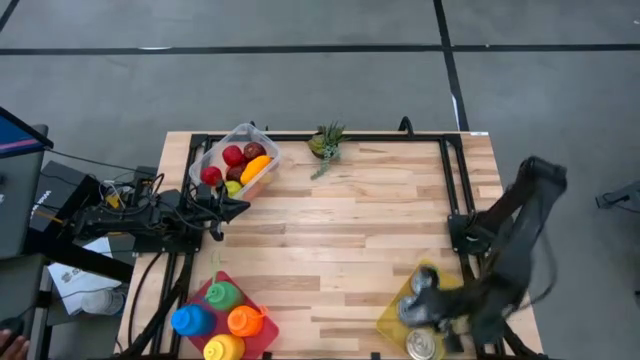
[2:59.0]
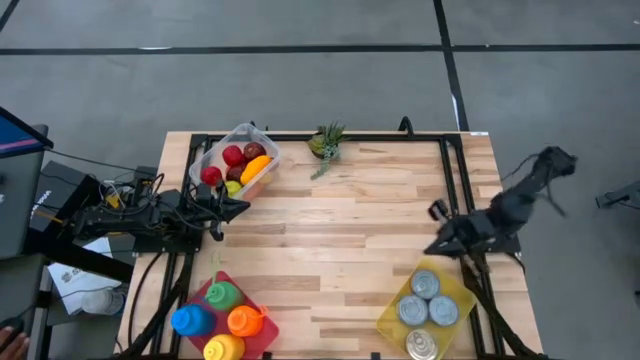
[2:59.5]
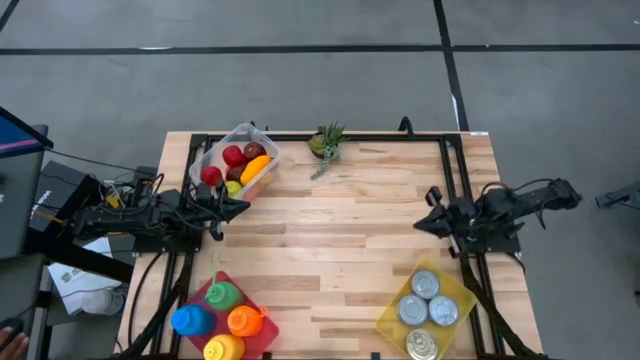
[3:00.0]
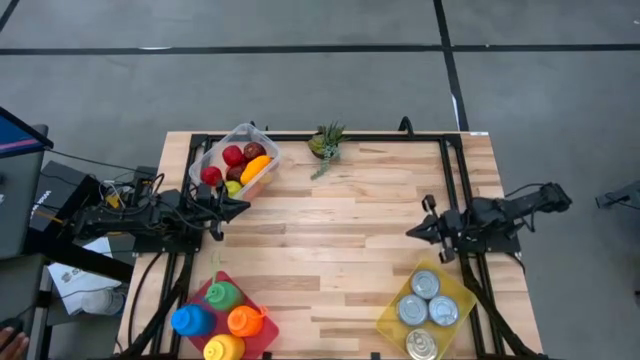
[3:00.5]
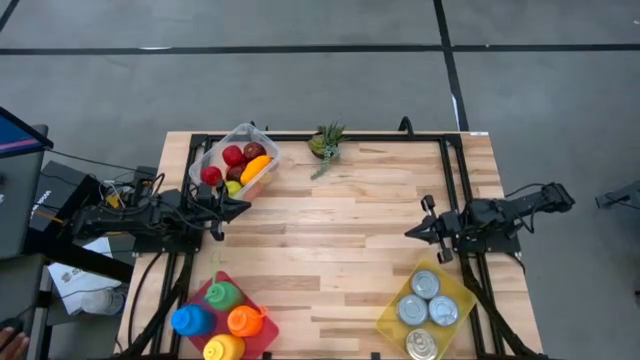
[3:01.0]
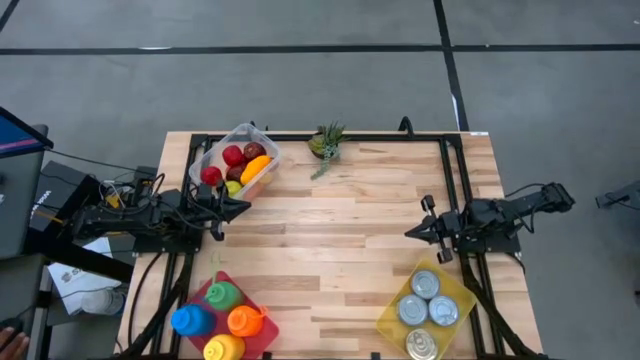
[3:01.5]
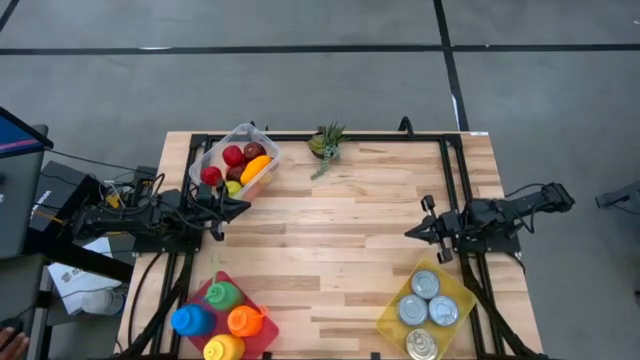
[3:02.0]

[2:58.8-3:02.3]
Task: Pick & Place Food Item
Return to Home Position

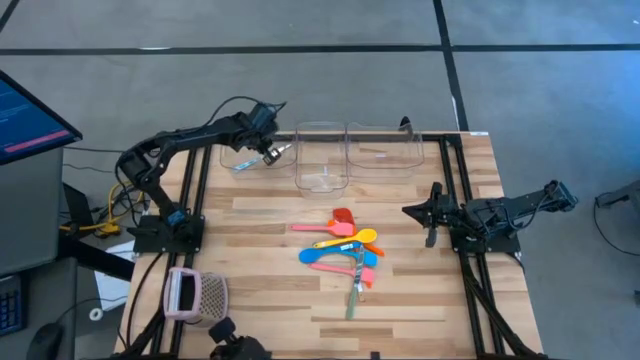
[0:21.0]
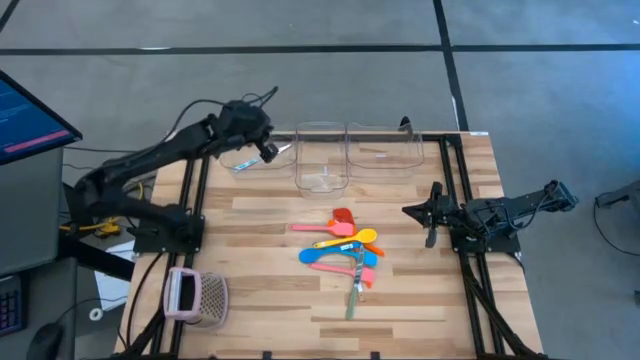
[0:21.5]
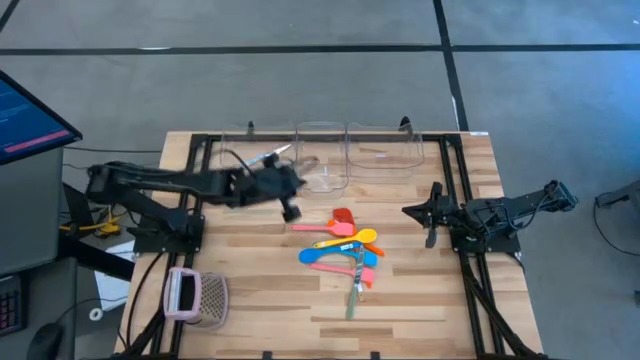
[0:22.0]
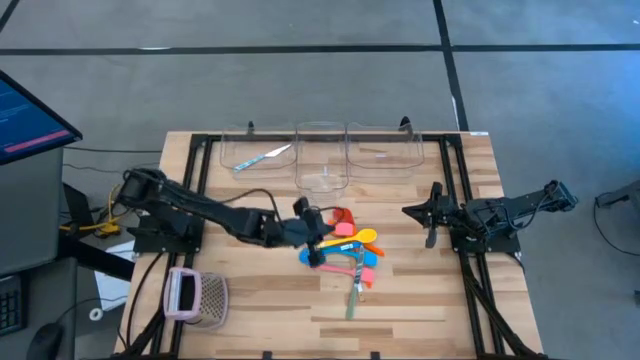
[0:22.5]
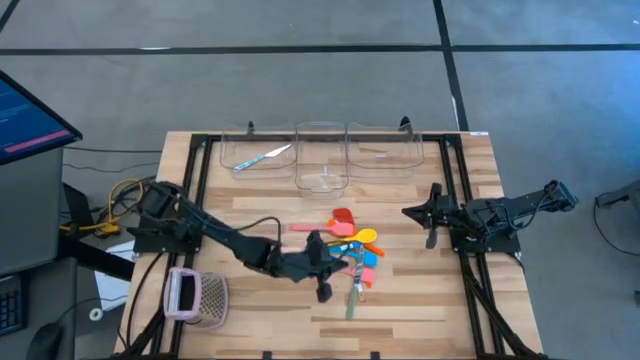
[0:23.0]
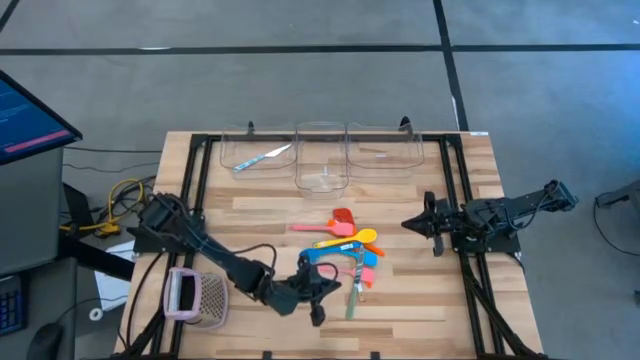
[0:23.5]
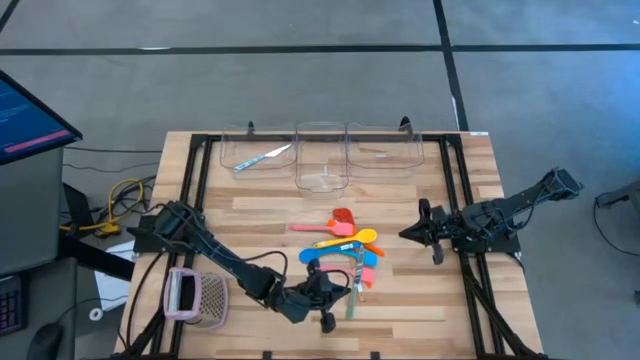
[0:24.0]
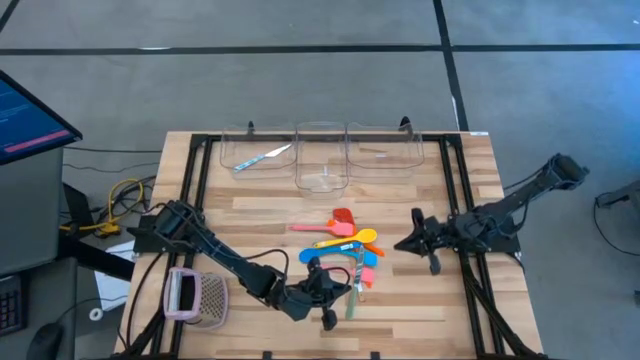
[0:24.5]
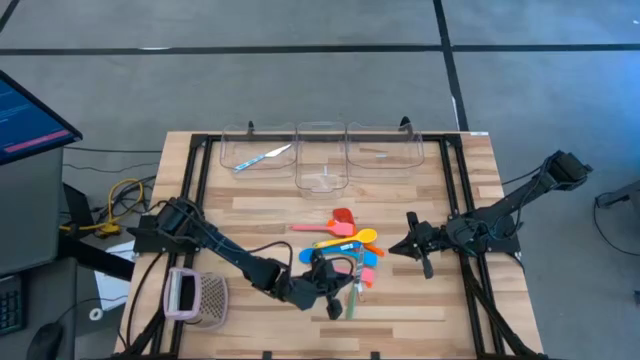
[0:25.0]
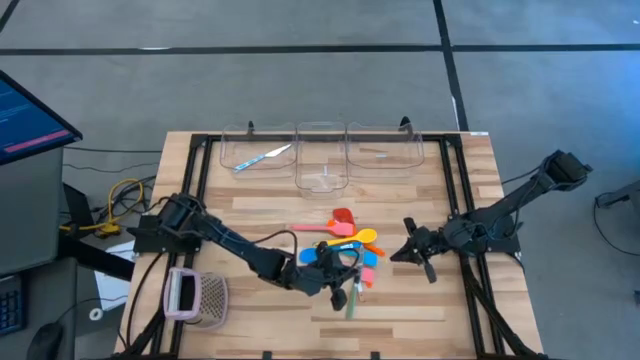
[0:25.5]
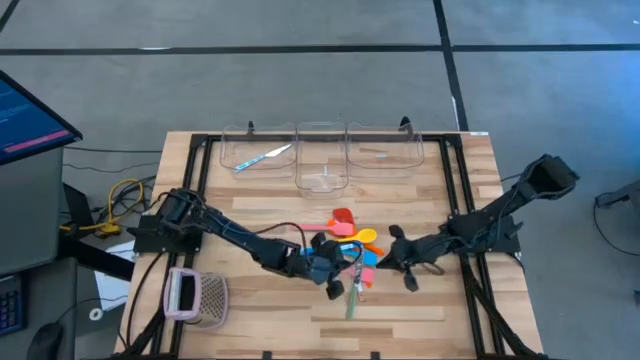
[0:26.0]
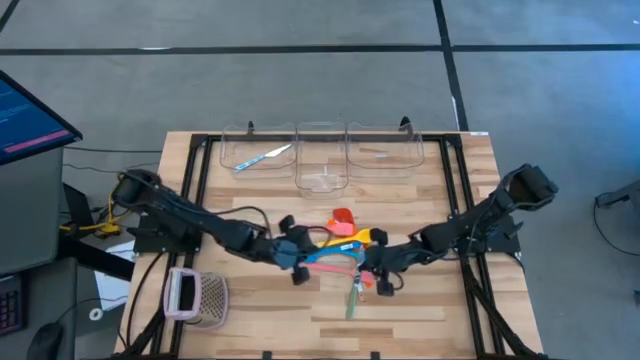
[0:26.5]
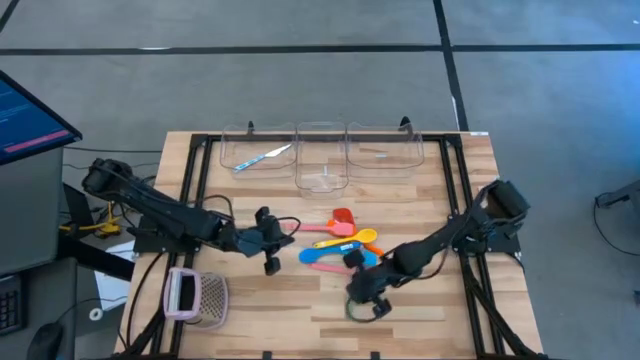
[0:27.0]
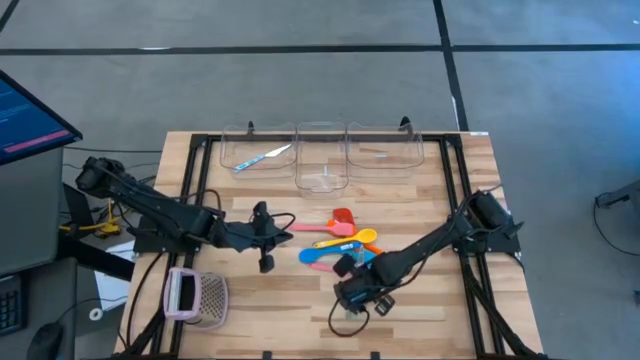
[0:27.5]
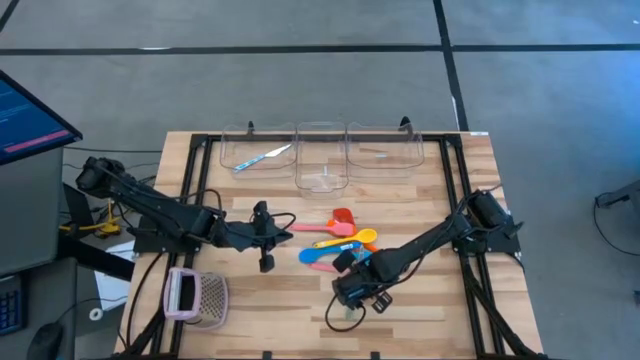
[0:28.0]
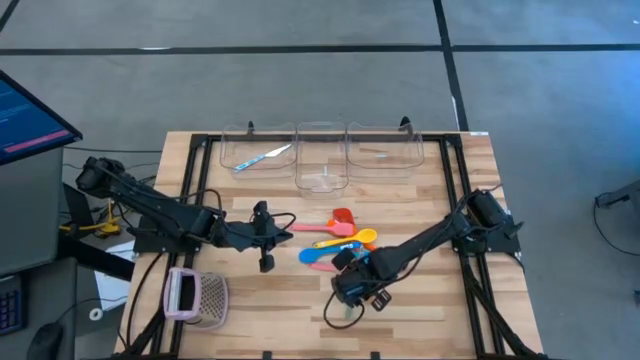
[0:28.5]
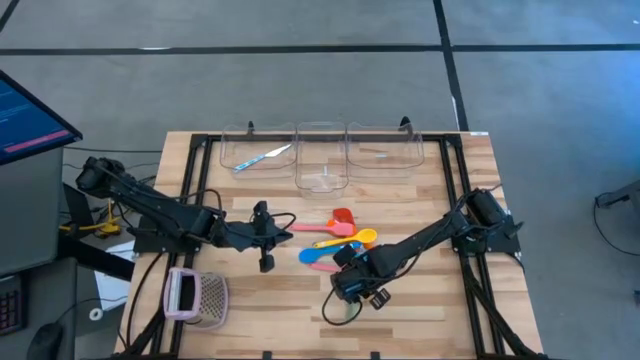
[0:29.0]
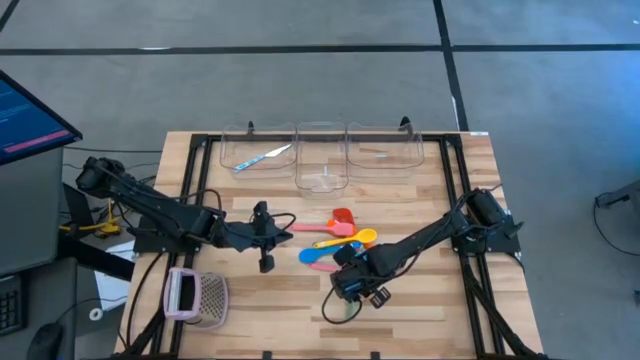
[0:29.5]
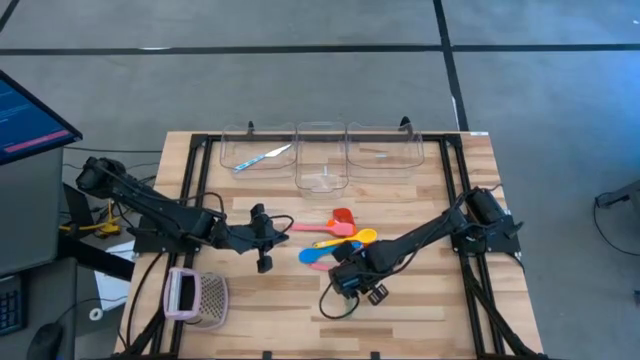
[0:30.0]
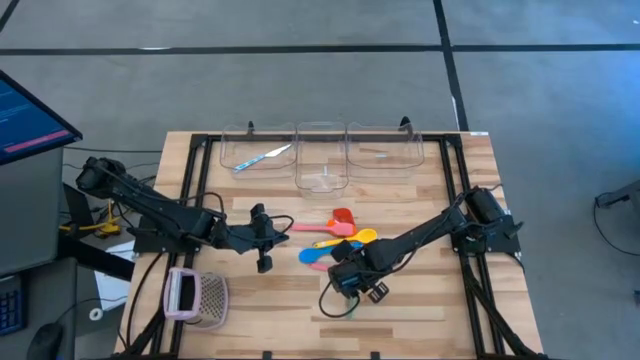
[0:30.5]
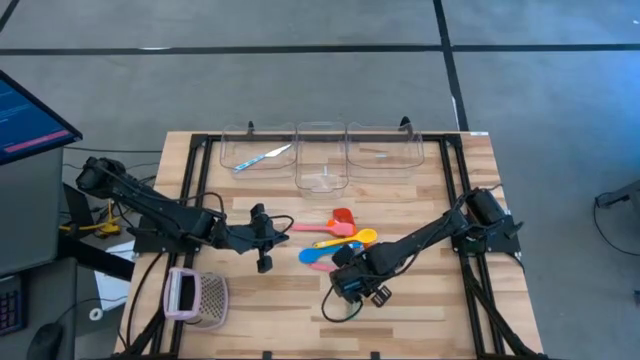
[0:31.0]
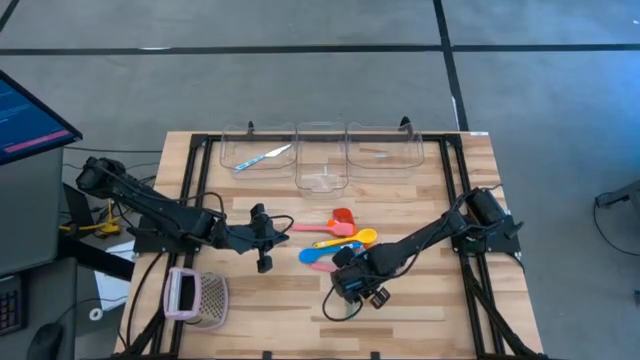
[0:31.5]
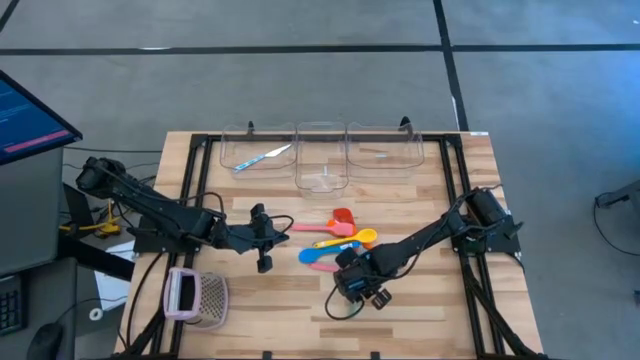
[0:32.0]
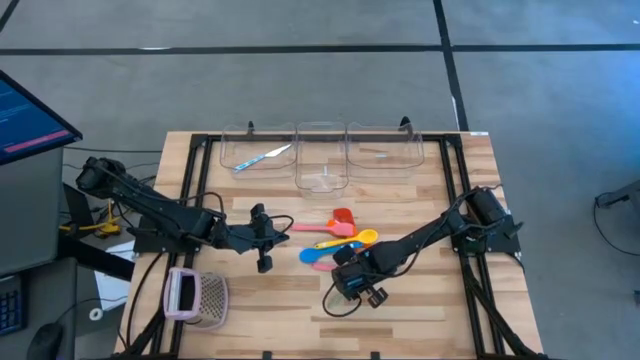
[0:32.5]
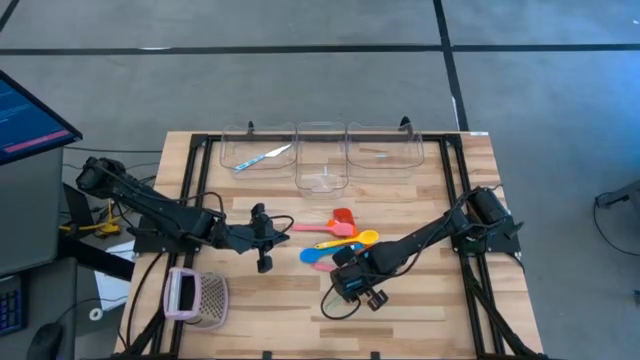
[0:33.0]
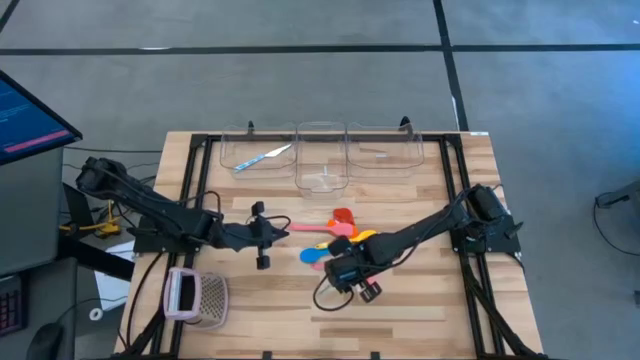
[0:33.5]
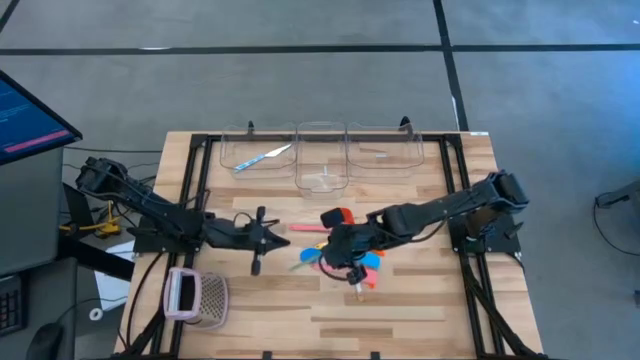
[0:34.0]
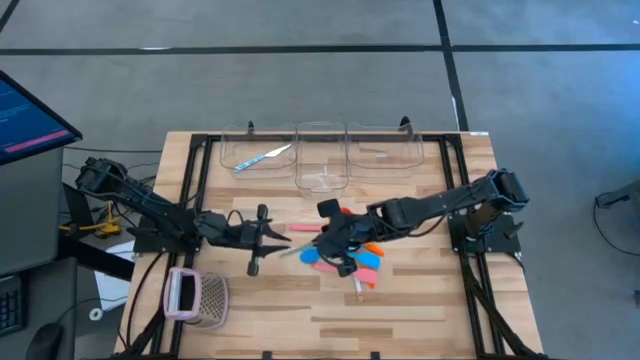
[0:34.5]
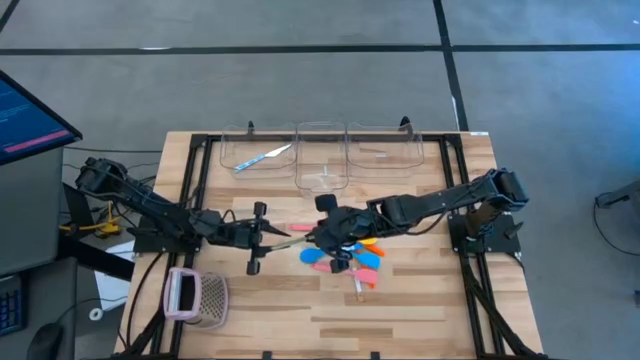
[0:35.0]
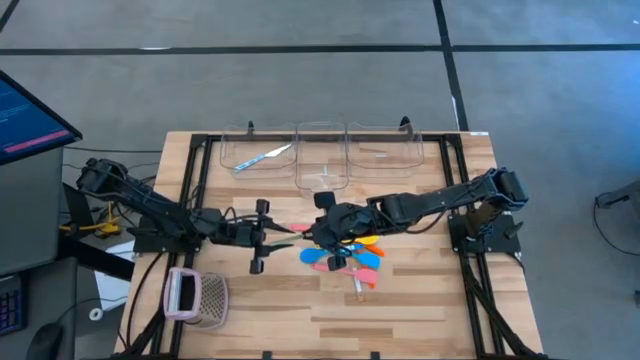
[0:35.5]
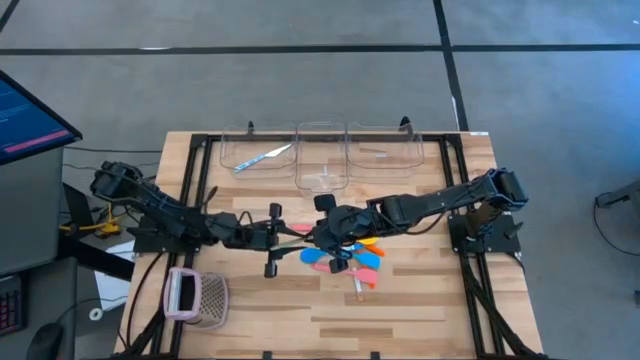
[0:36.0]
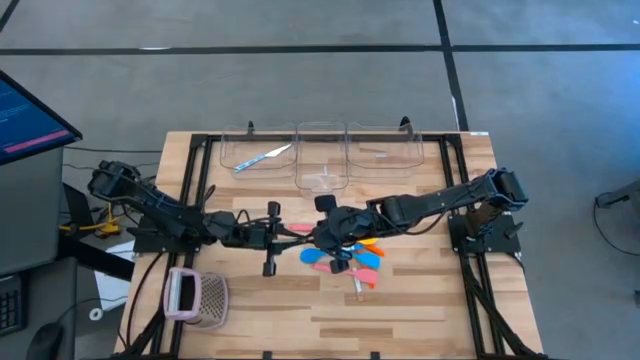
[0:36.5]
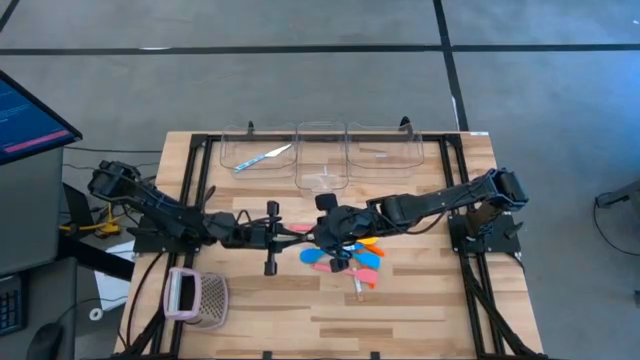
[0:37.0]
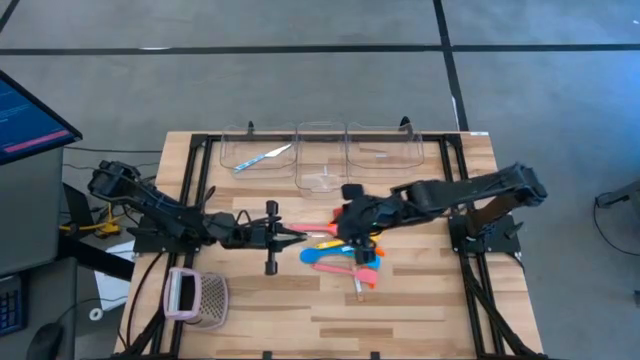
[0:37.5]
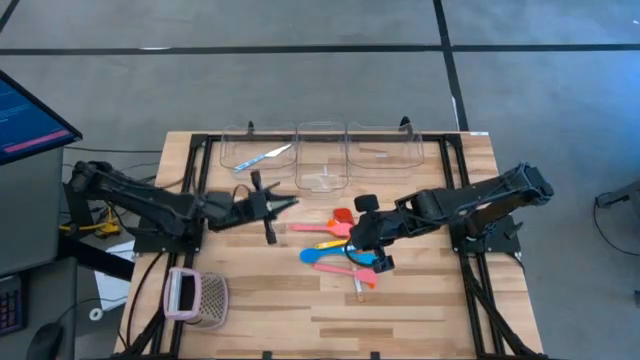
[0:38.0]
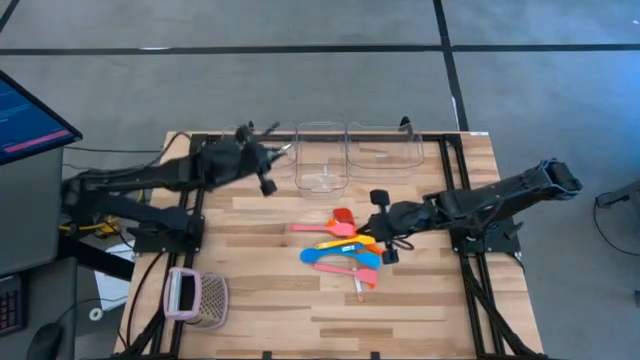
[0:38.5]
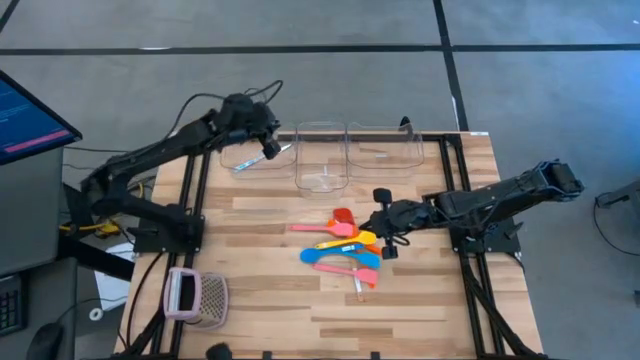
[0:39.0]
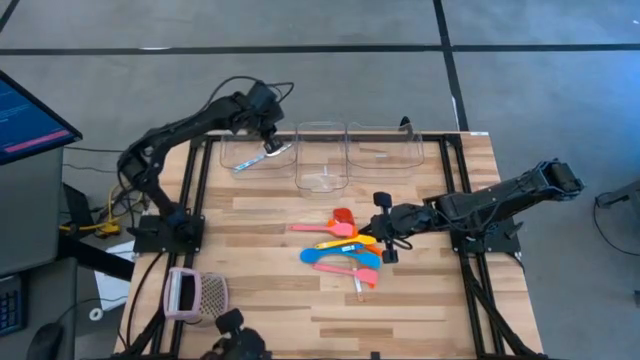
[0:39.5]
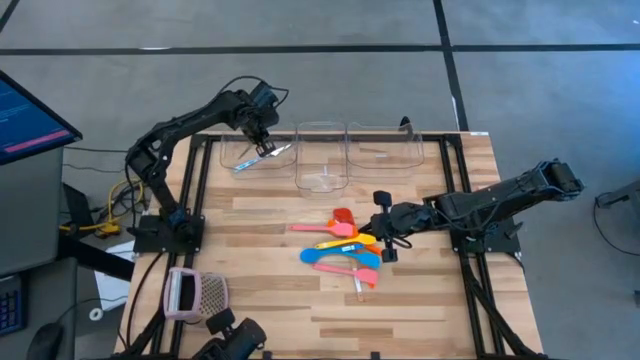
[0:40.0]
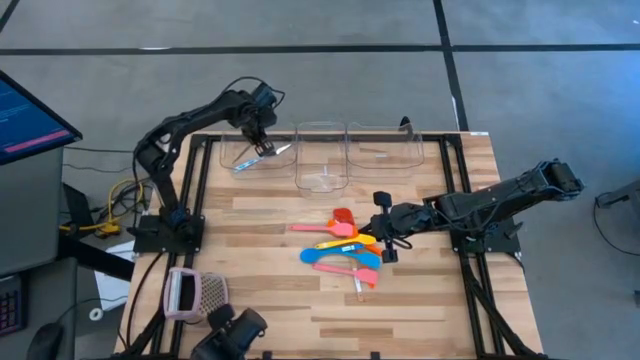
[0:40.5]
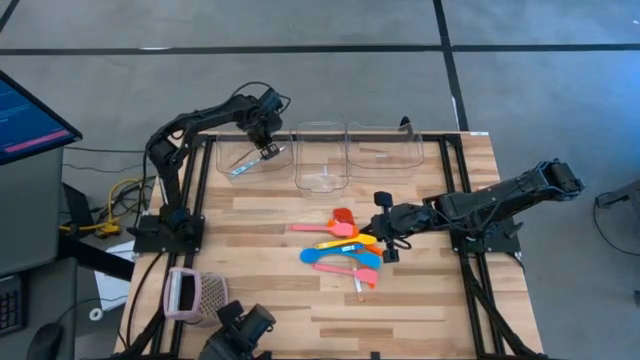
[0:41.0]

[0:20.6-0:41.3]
Task: Pick & Place Kitchen Items
Put the green table knife into the left transparent bin
